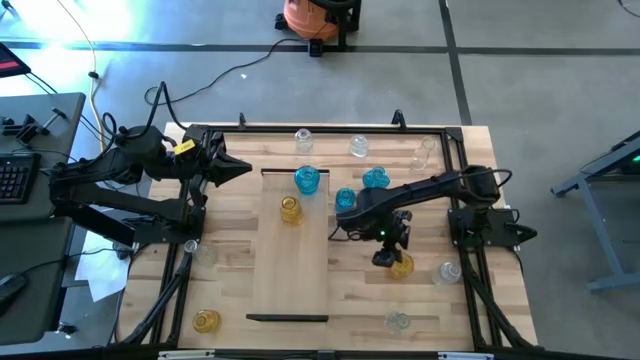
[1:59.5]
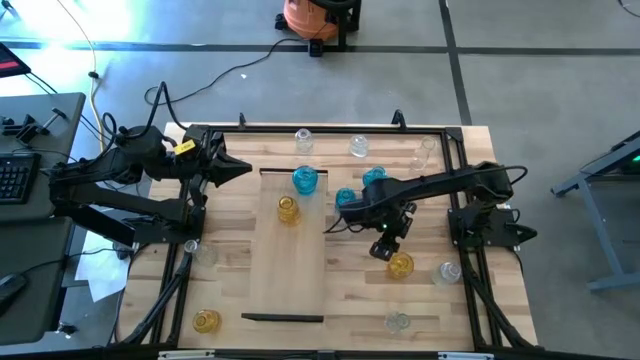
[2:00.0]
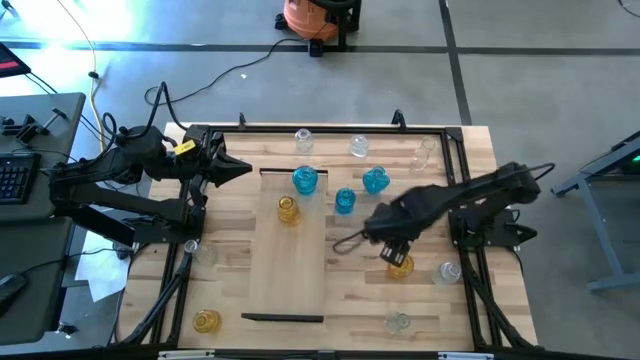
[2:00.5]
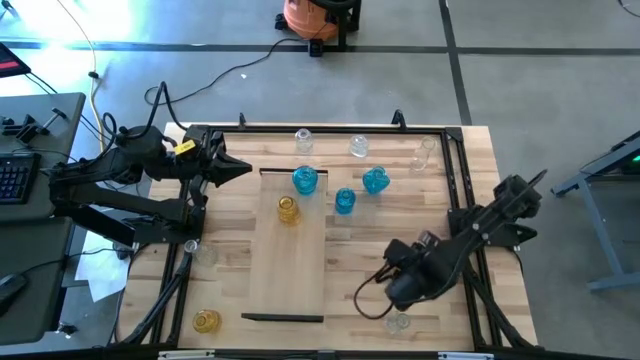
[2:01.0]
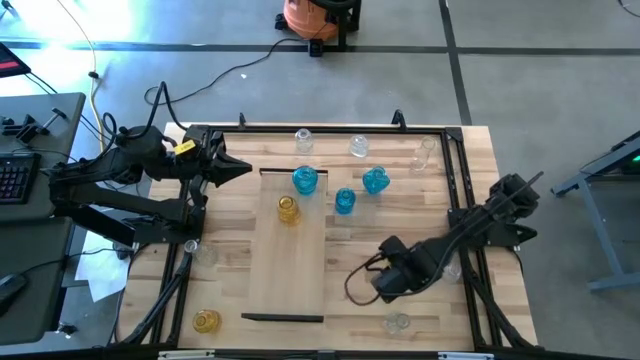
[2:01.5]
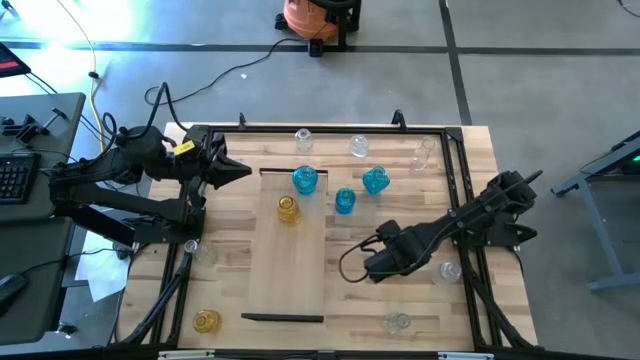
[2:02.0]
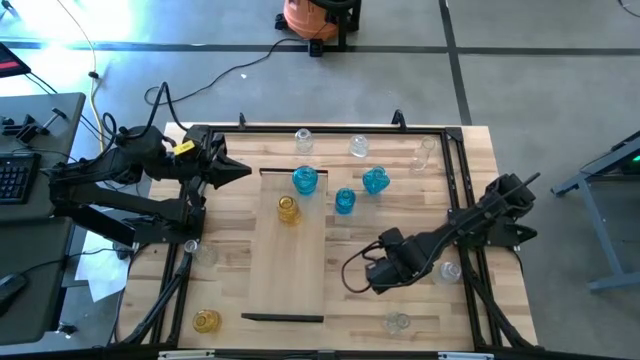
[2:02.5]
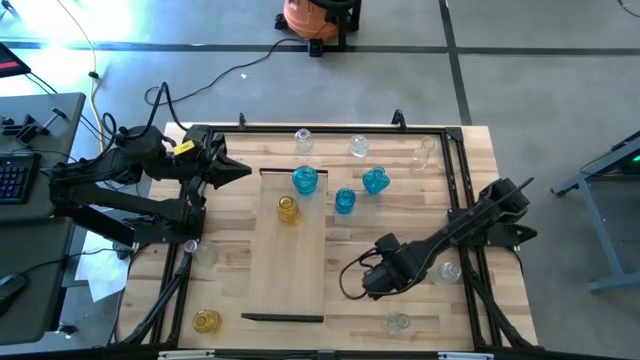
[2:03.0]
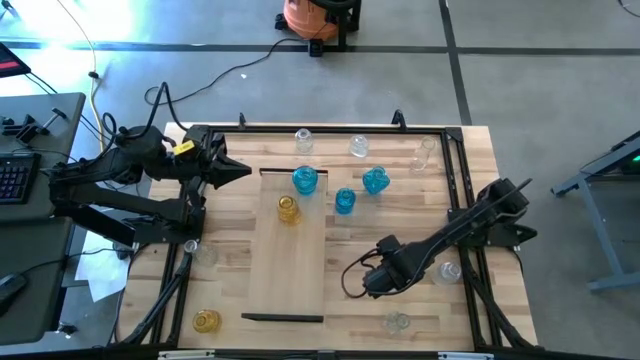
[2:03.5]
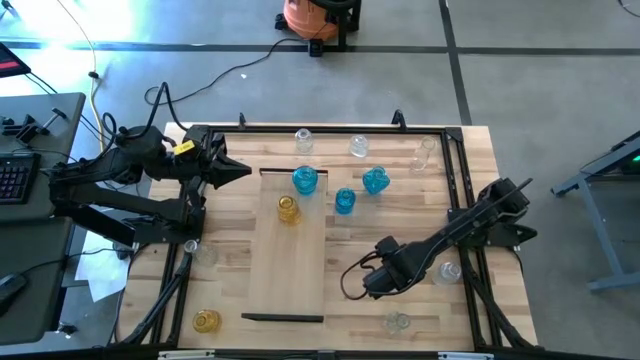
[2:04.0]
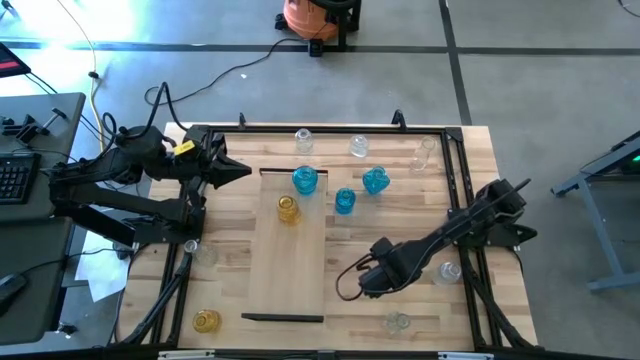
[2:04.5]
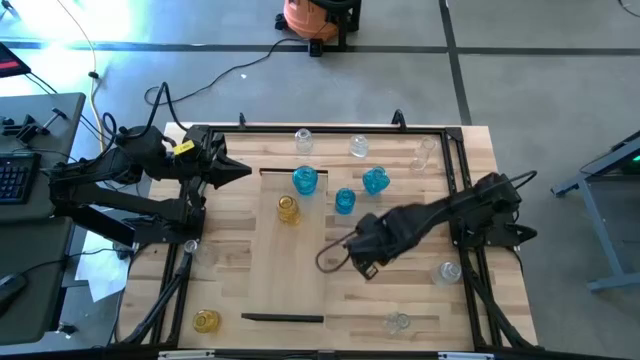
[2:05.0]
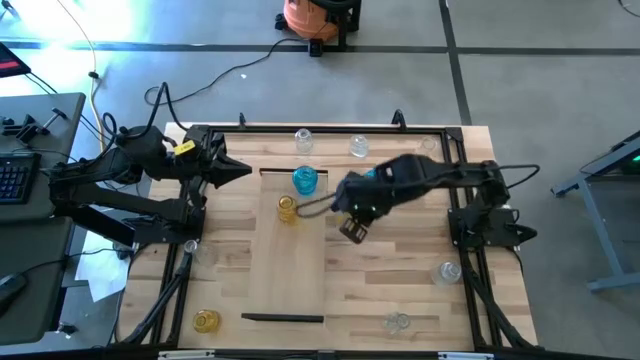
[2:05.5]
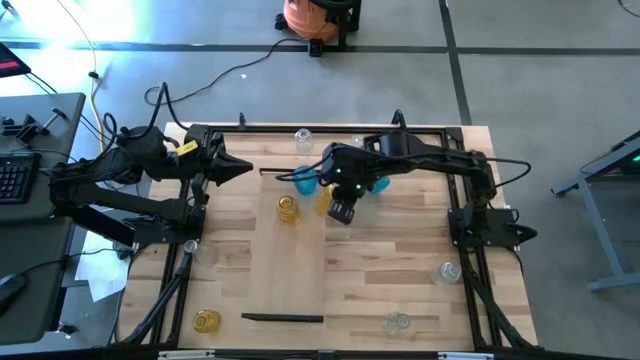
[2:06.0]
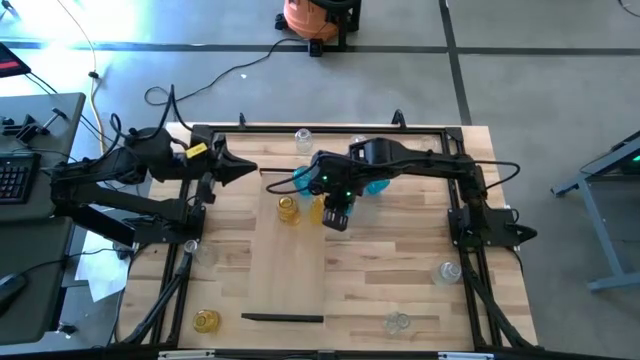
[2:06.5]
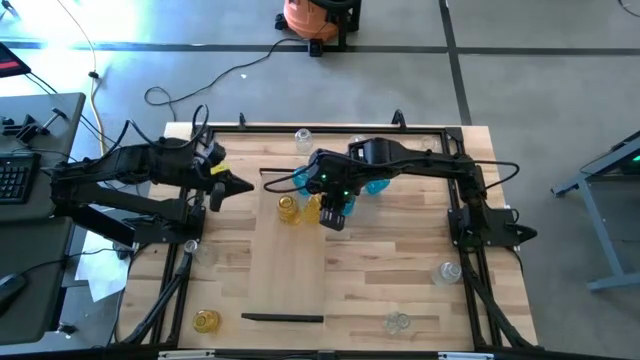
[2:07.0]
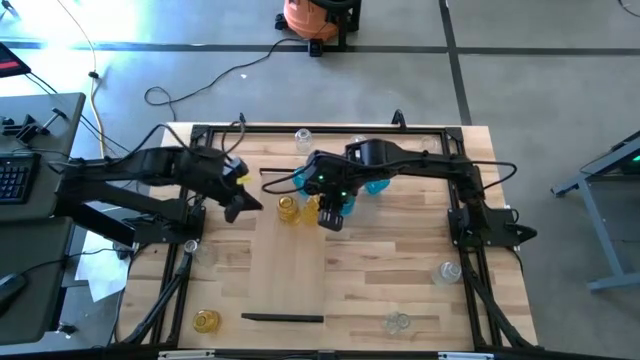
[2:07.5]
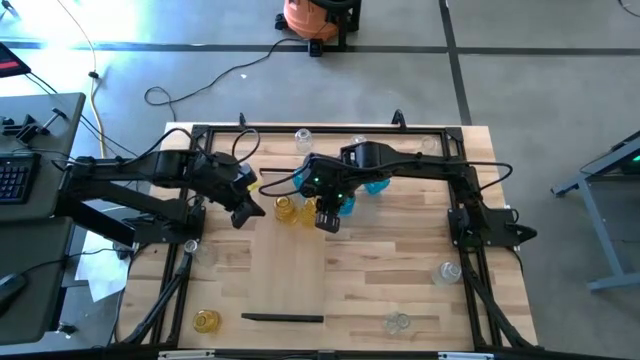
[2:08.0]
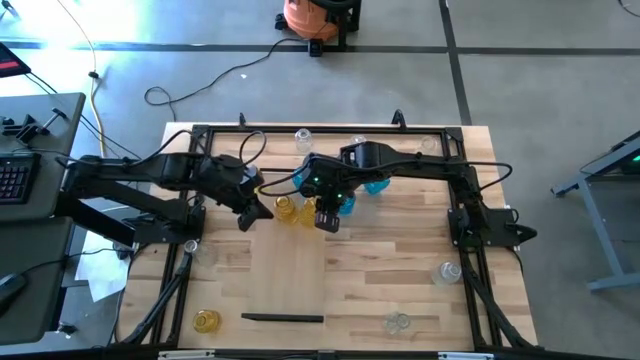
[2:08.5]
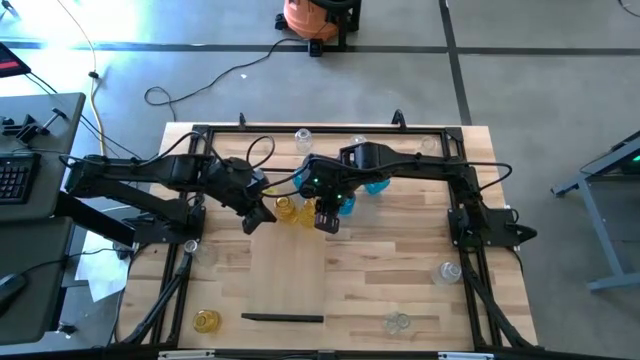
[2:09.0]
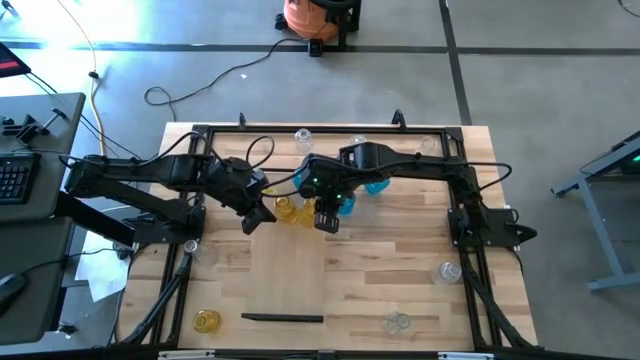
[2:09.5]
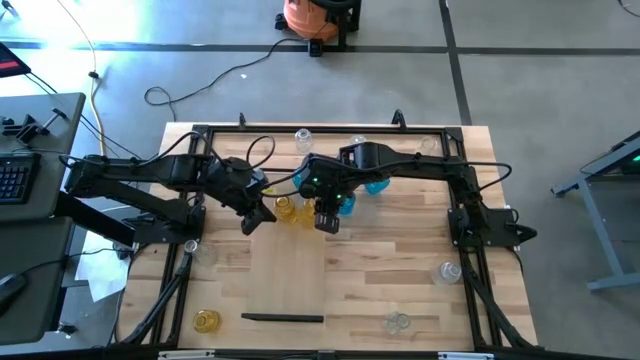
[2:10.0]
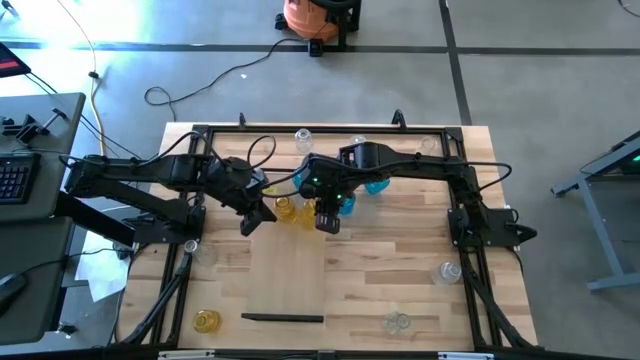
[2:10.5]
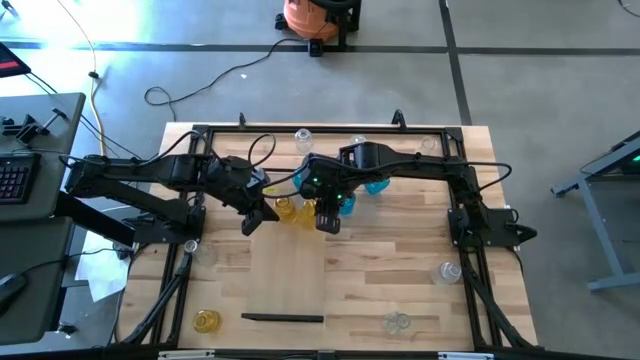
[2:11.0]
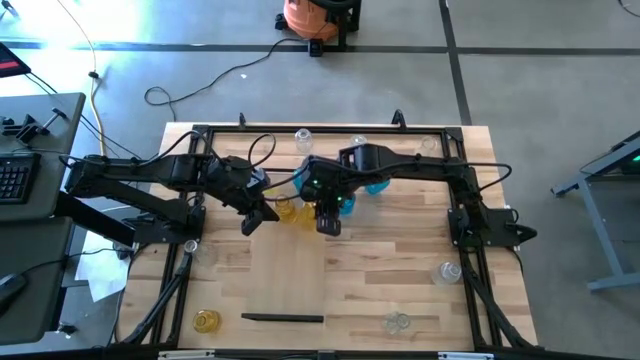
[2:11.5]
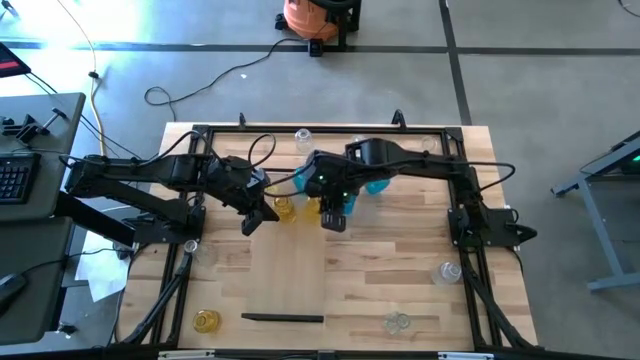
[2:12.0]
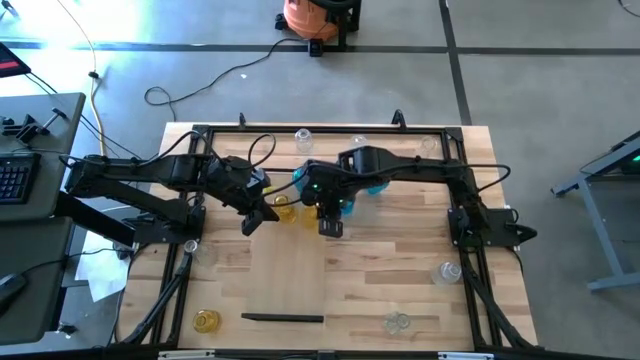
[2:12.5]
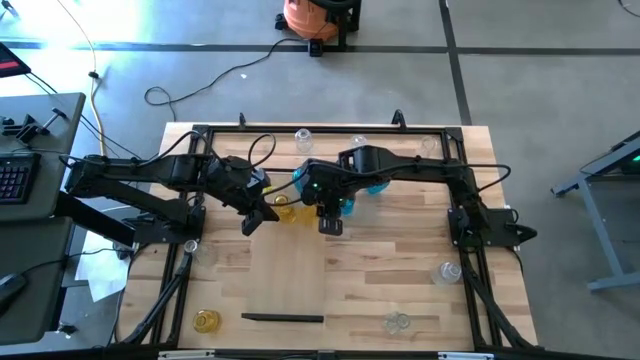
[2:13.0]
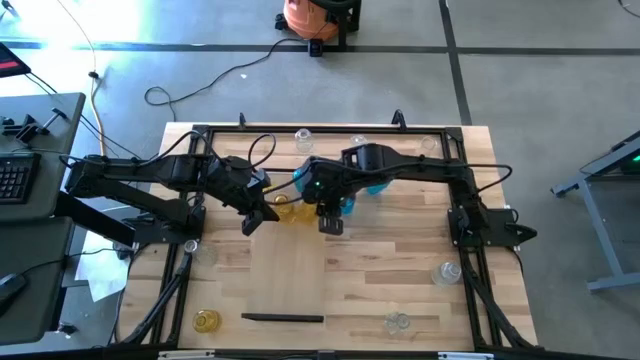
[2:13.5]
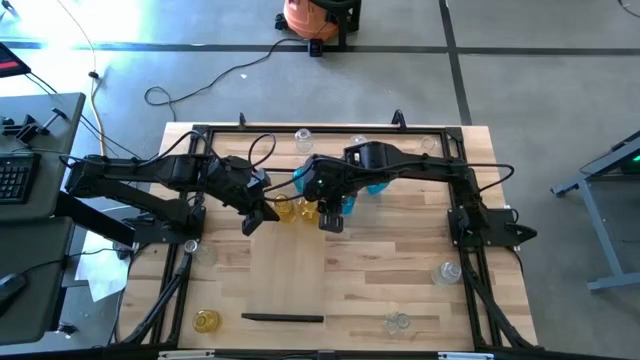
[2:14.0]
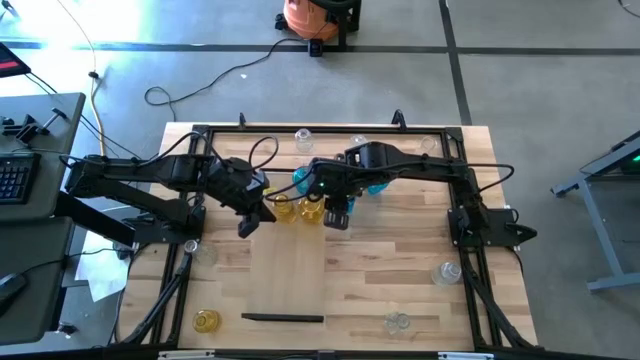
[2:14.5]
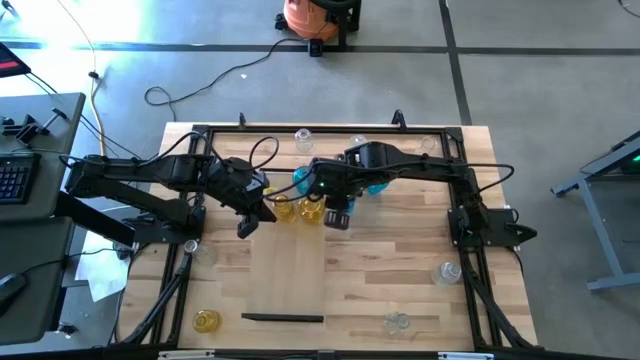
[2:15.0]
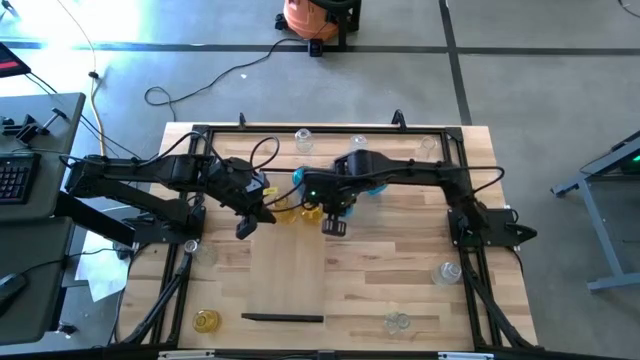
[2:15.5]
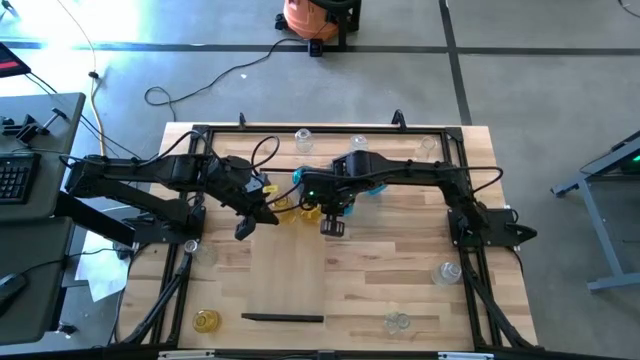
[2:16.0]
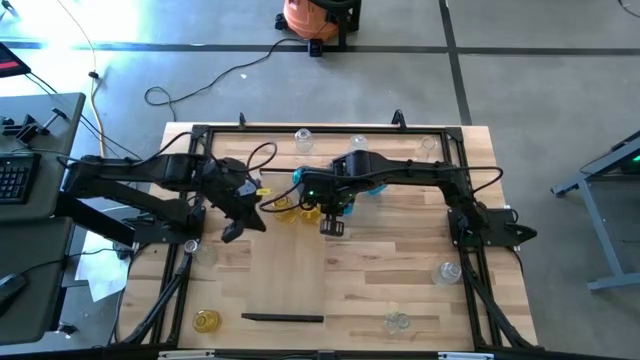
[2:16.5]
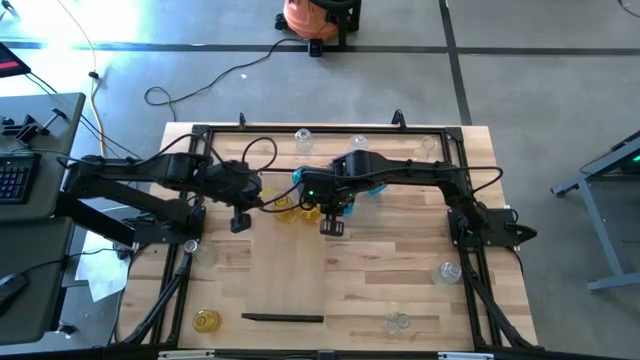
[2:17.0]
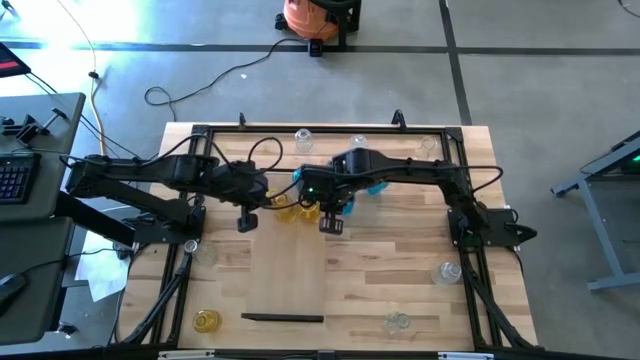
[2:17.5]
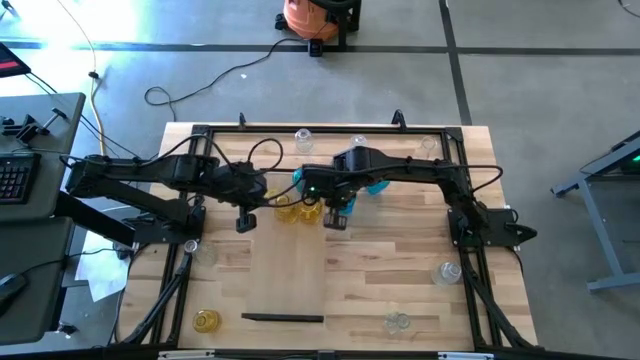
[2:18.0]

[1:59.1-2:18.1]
Task: sort vases onto shelf
Put the yellow vase on the shelf to align with the other yellow vase

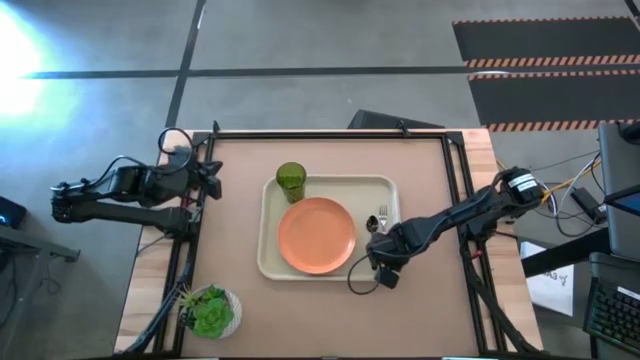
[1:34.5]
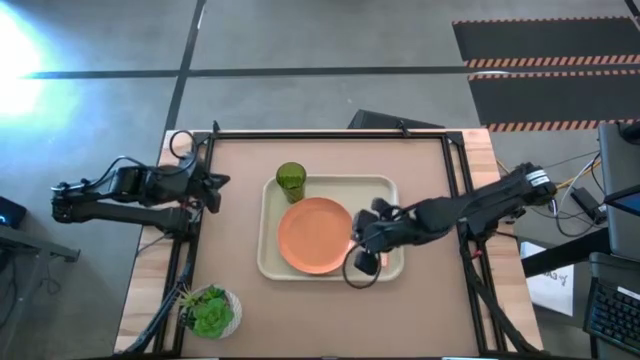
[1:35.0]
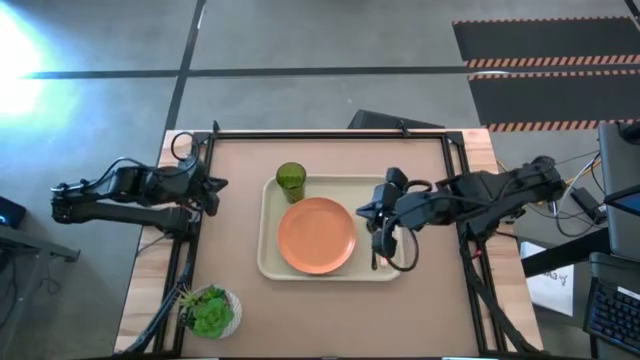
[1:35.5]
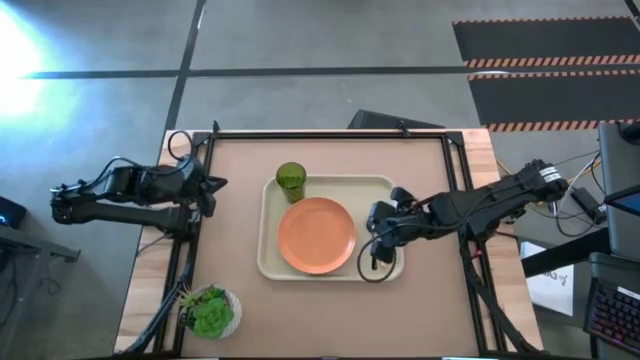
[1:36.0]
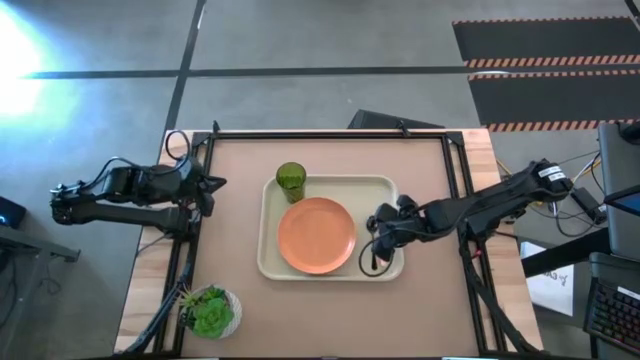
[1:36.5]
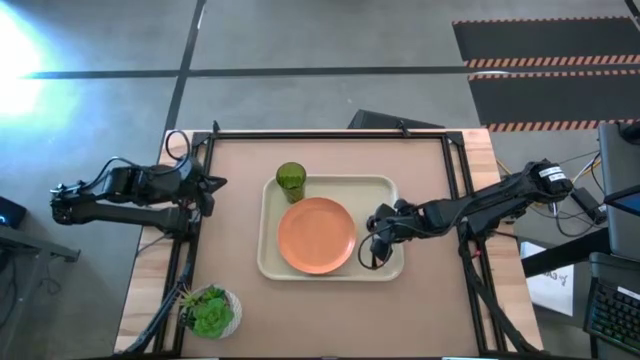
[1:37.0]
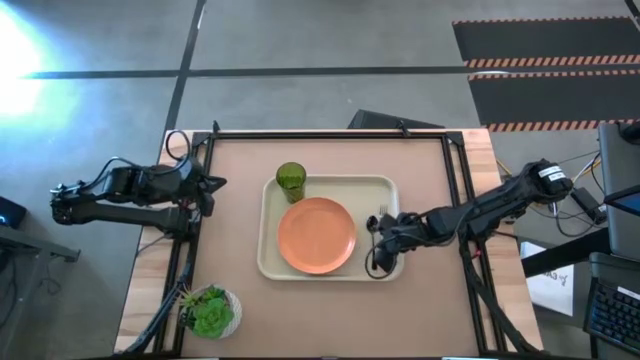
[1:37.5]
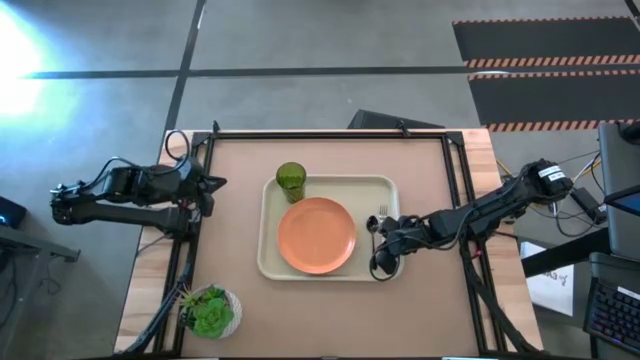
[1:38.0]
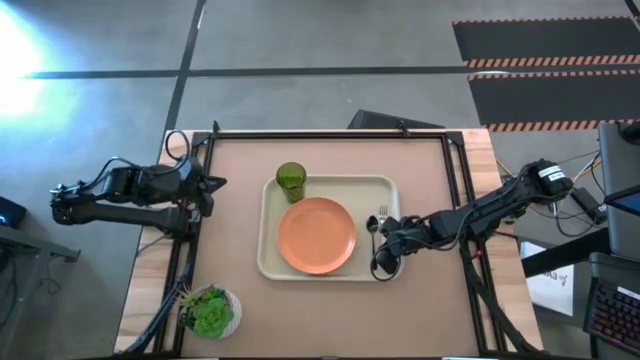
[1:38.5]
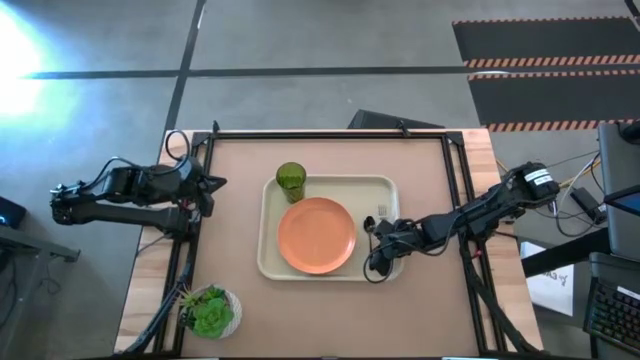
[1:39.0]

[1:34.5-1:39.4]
Task: Pick and place plate/cup/fork/spoon on tray
Adjust the silverware on the white serving tray
